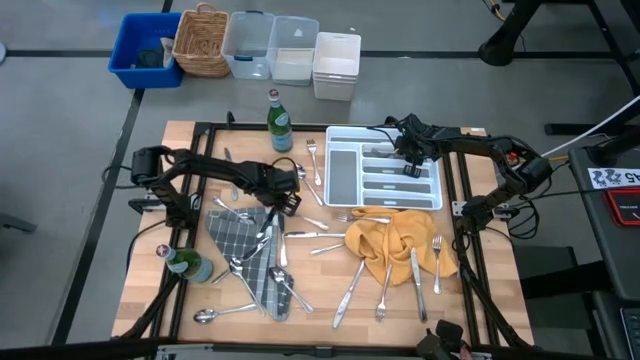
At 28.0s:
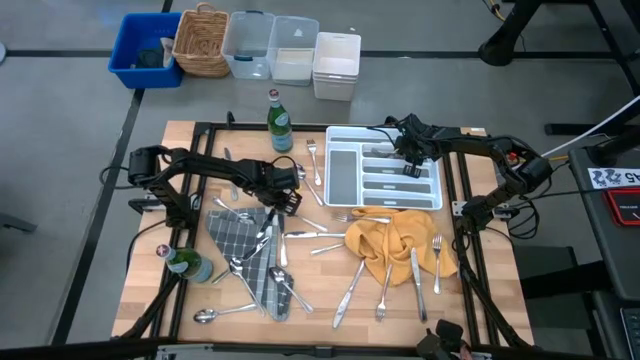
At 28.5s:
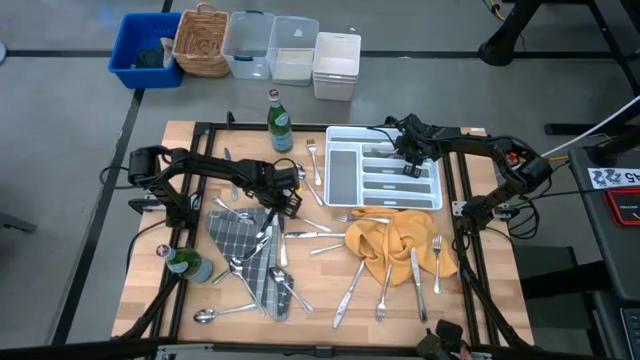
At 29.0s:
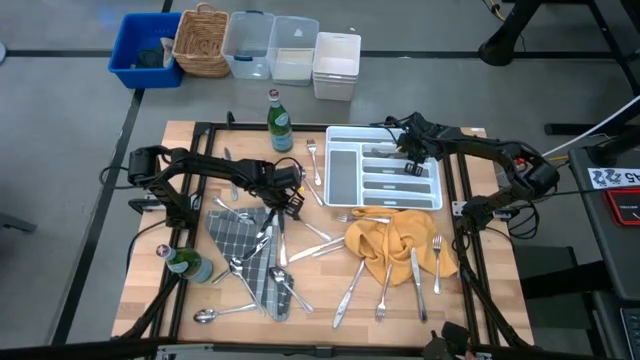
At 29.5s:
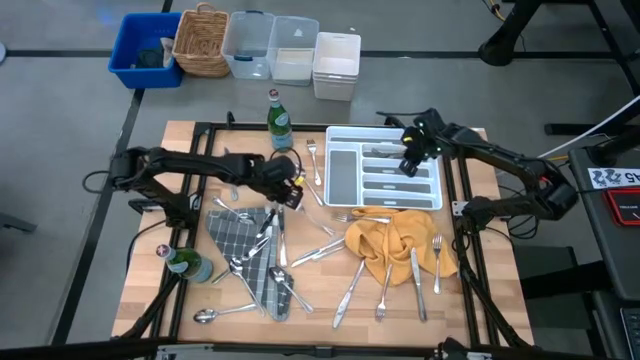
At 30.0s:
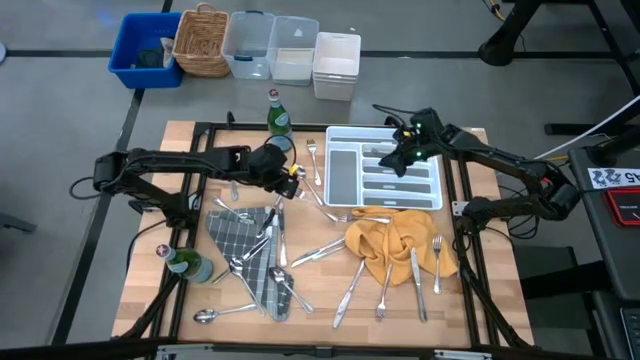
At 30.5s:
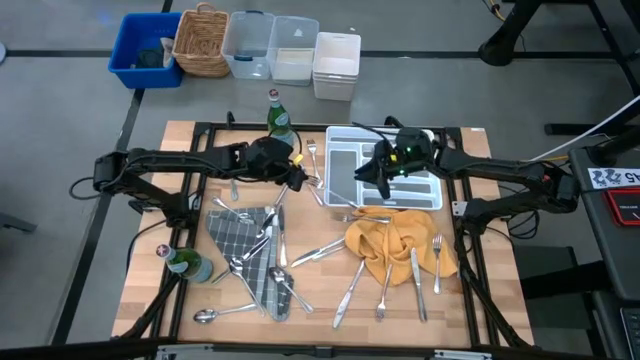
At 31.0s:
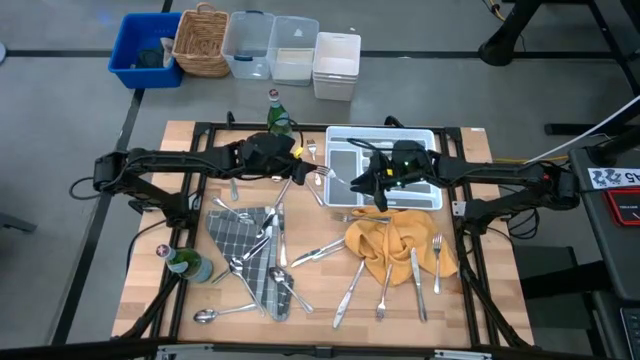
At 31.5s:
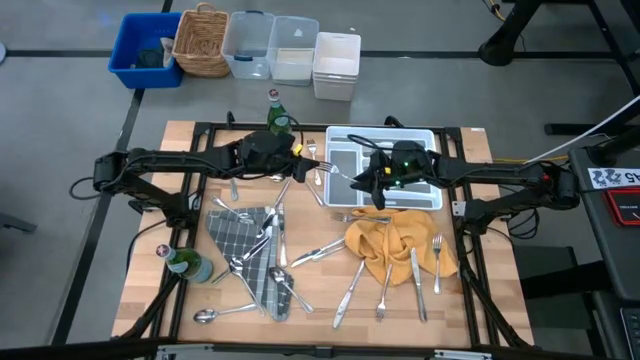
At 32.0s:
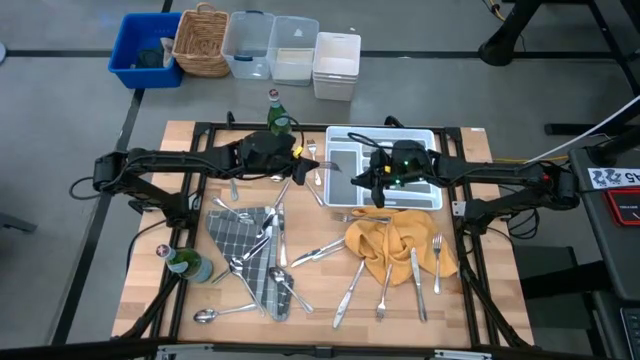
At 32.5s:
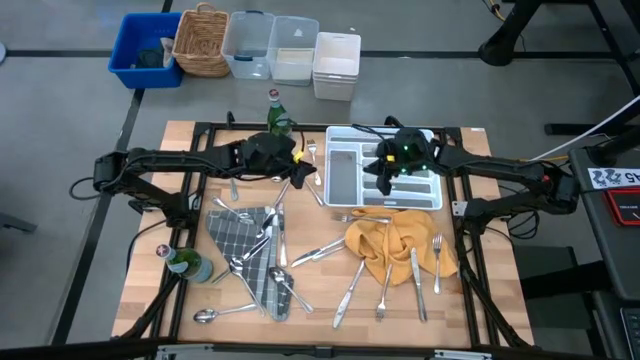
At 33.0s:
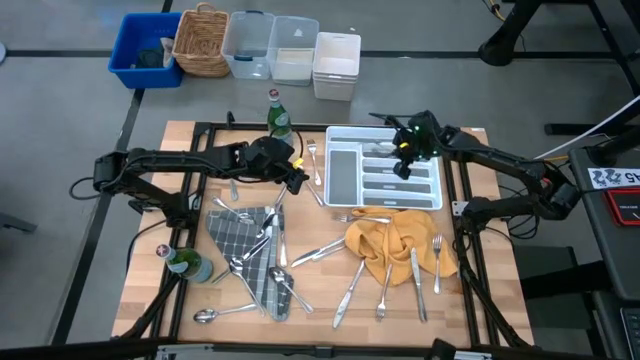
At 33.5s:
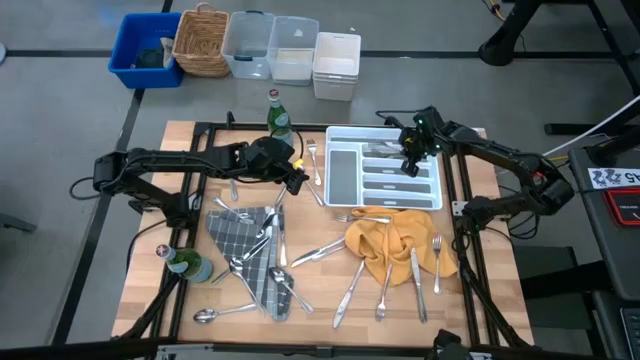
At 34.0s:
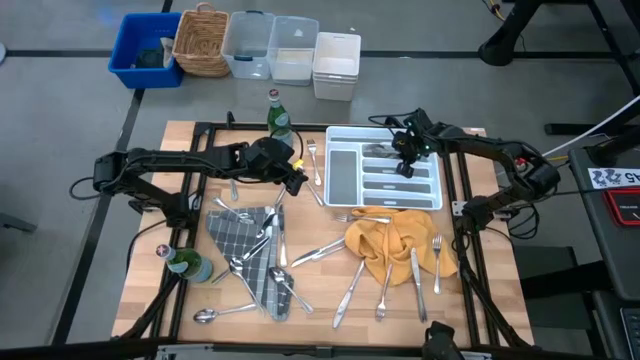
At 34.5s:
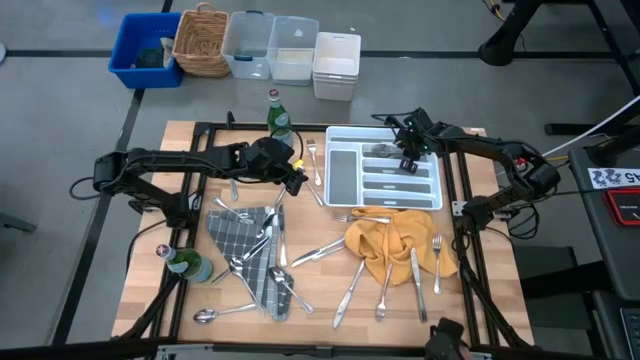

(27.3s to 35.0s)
Put the silver fork into the cutlery tray

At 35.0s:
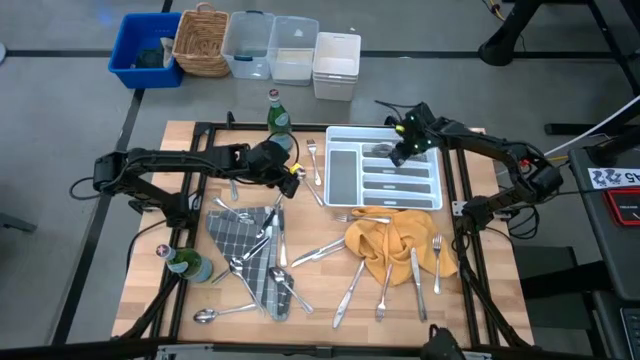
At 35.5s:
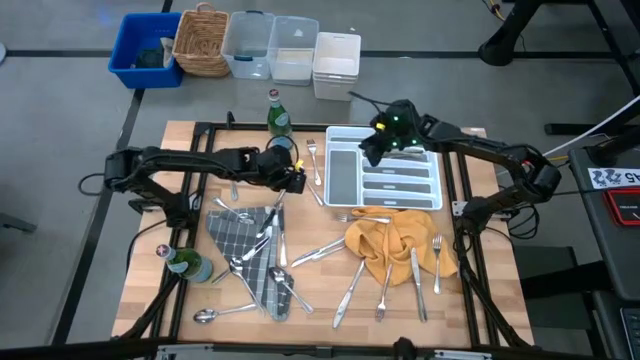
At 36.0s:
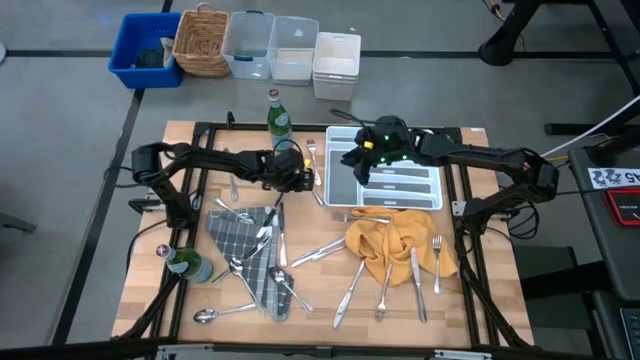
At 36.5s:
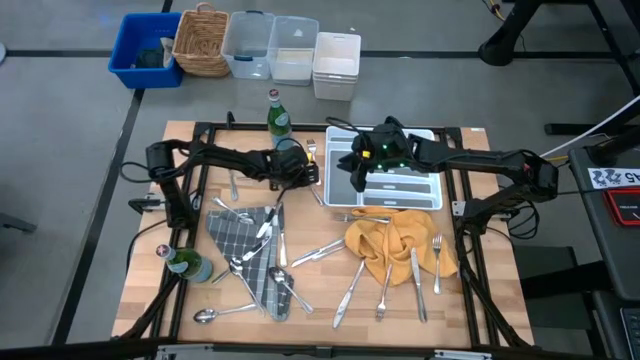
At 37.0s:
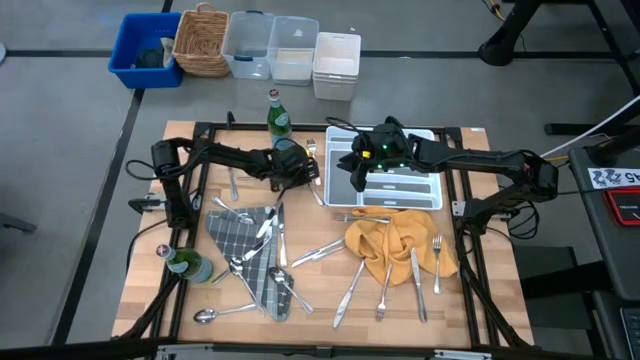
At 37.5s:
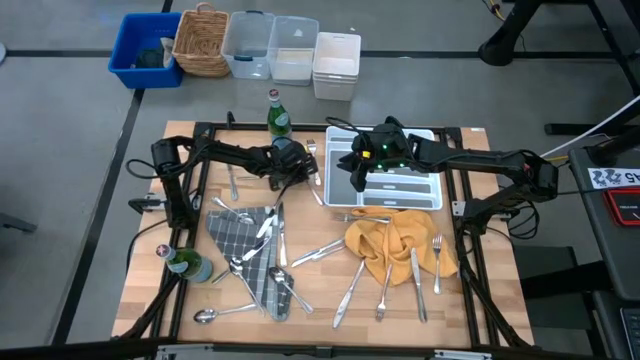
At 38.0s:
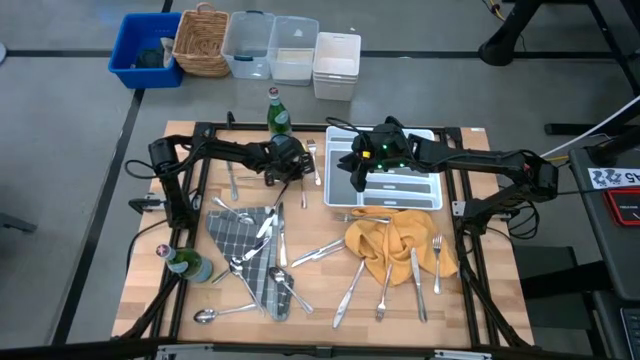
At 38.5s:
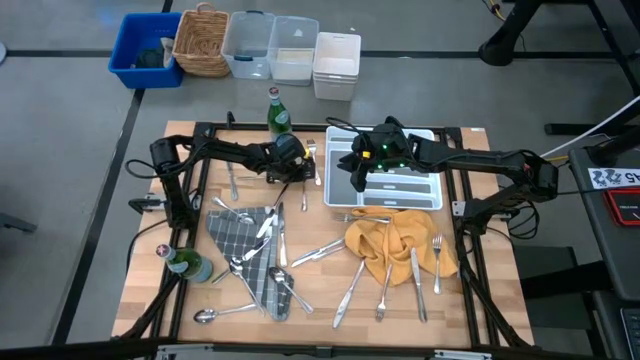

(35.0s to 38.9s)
Put the silver spoon into the cutlery tray

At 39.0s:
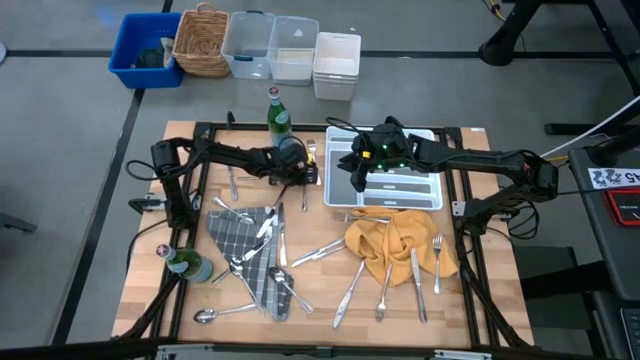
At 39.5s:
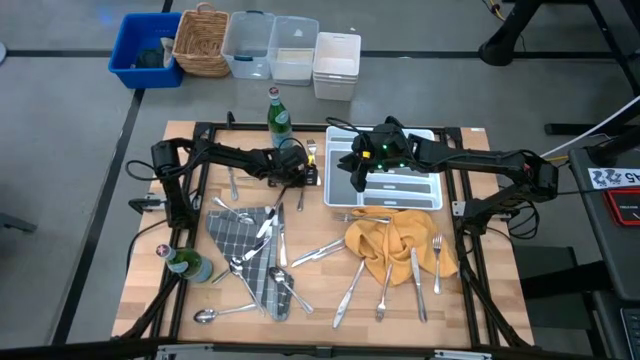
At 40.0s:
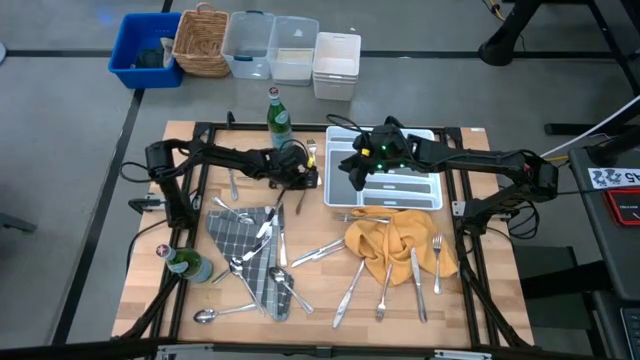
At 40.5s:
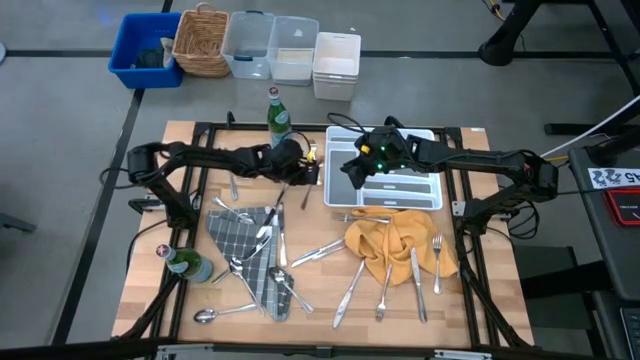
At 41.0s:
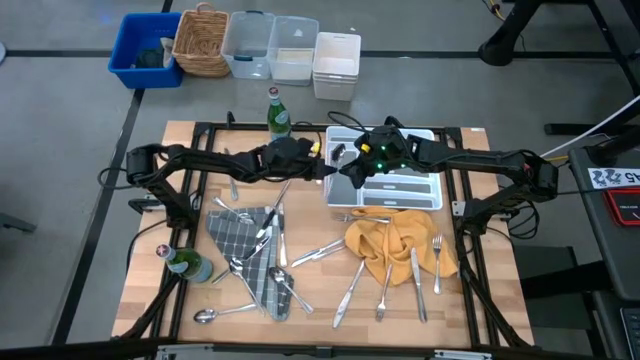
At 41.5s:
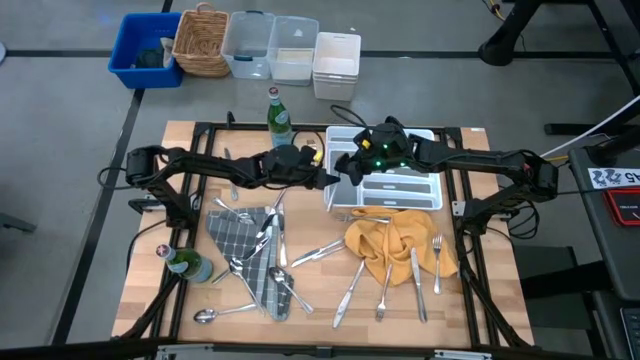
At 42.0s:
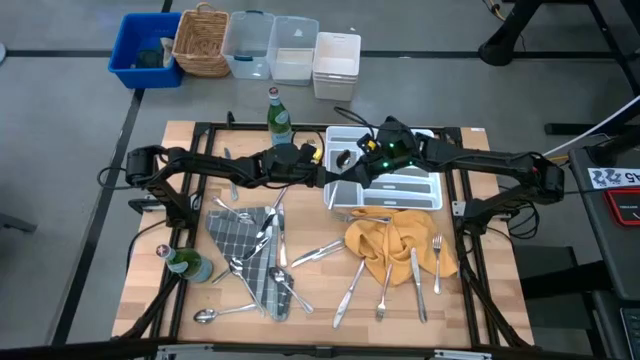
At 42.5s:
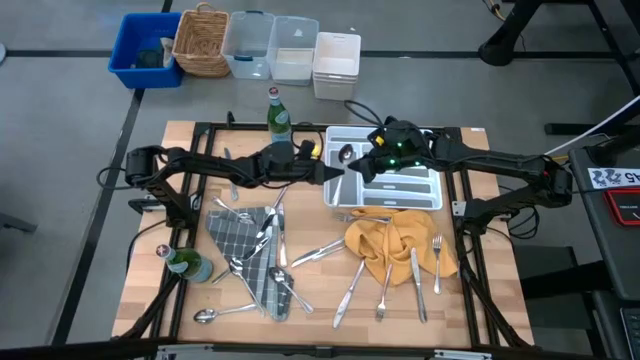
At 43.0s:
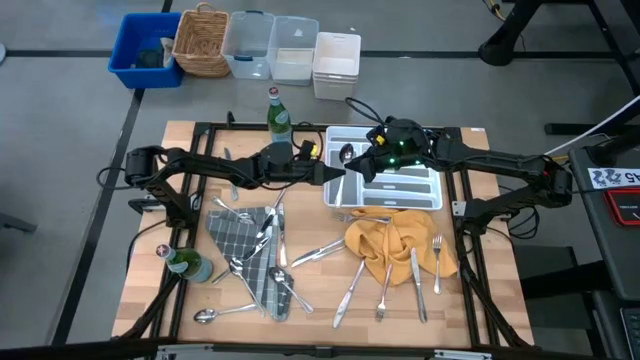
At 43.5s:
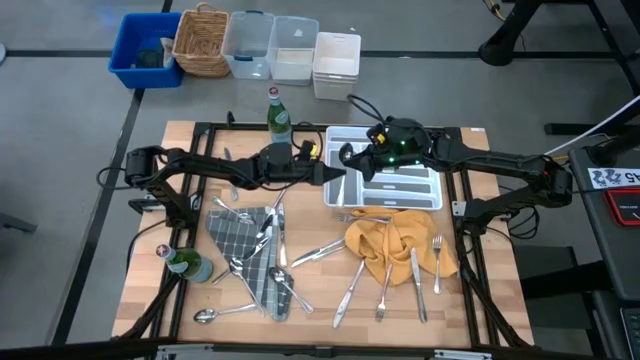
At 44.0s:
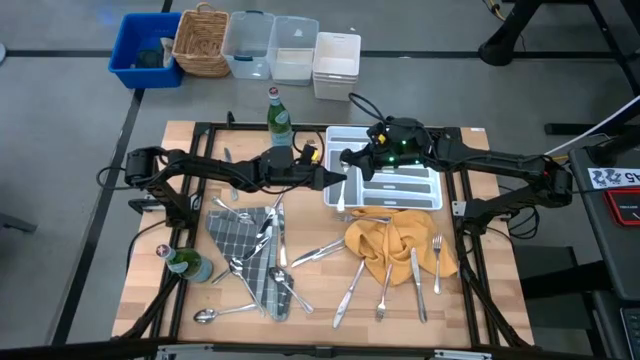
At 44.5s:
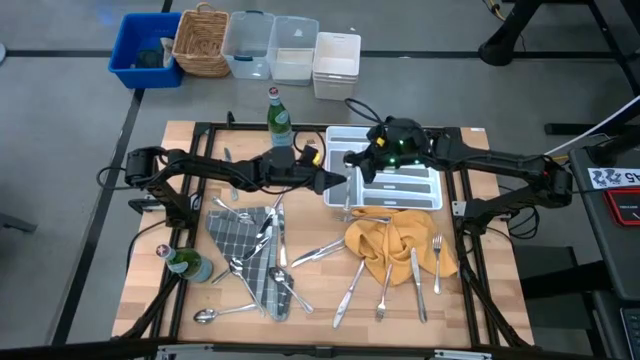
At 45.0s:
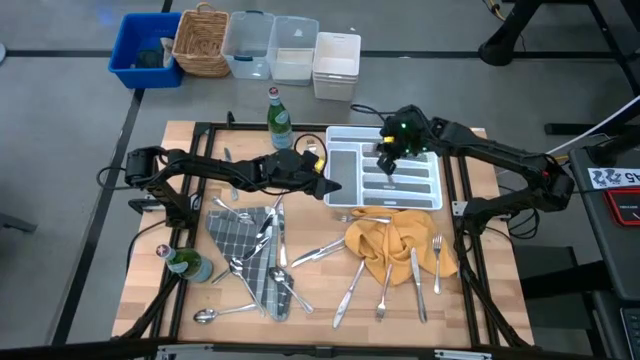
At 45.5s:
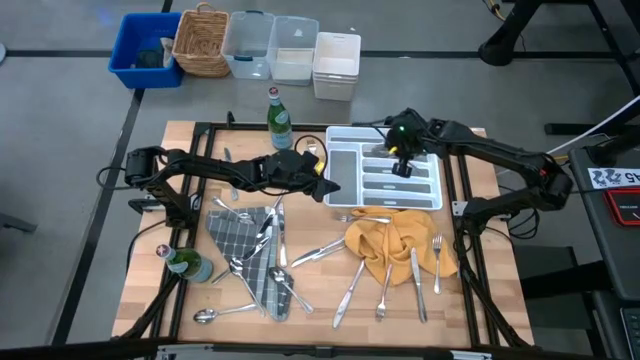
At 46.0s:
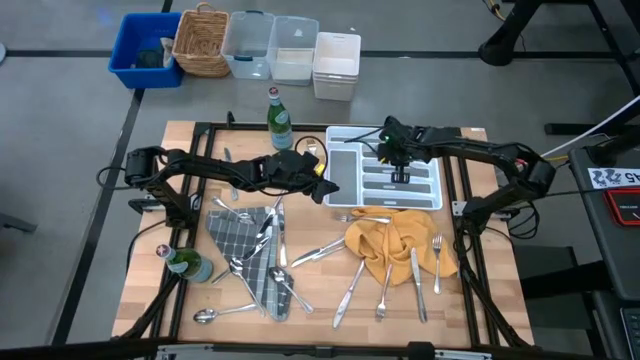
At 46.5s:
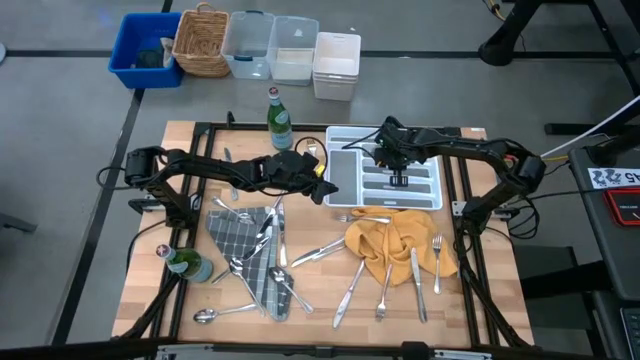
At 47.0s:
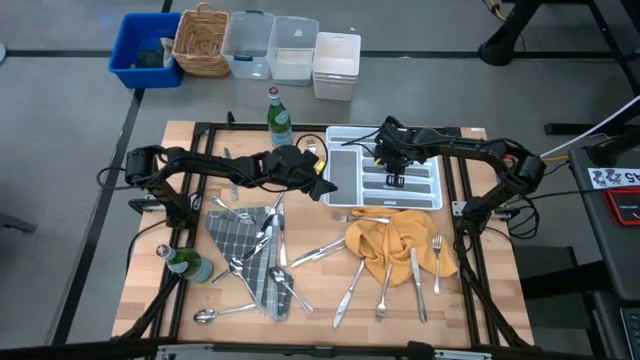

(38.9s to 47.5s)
Put the silver spoon into the cutlery tray
